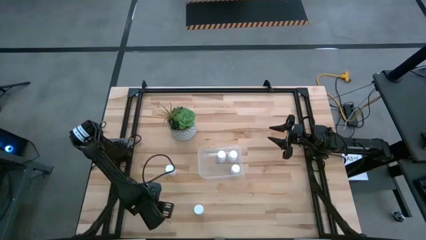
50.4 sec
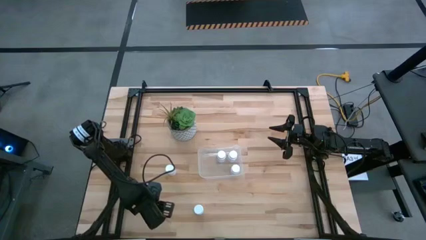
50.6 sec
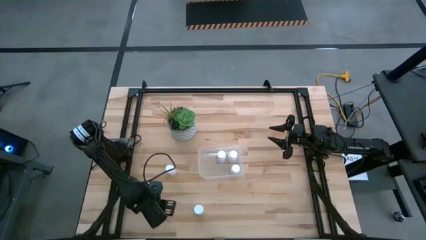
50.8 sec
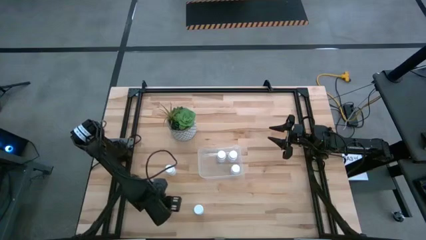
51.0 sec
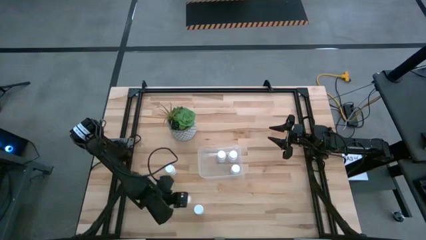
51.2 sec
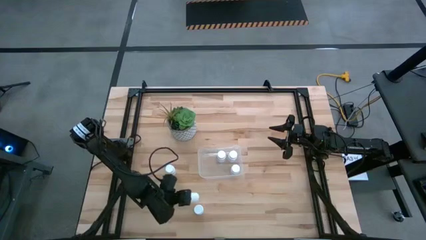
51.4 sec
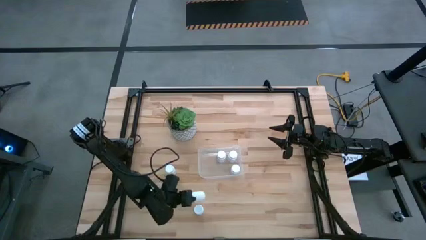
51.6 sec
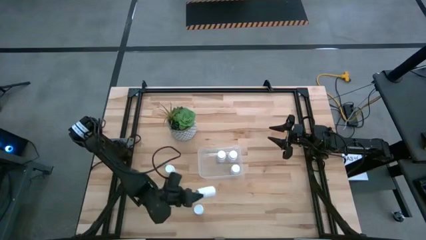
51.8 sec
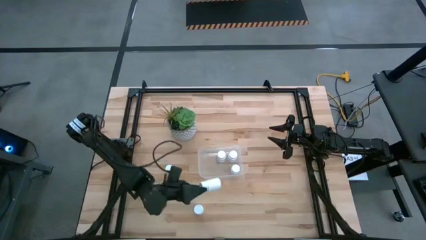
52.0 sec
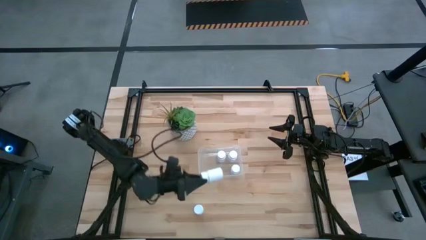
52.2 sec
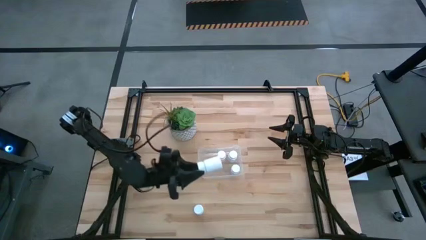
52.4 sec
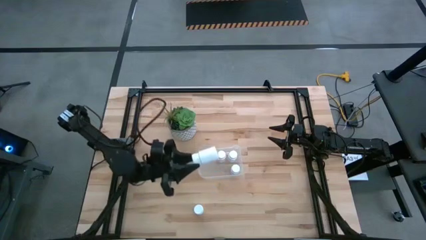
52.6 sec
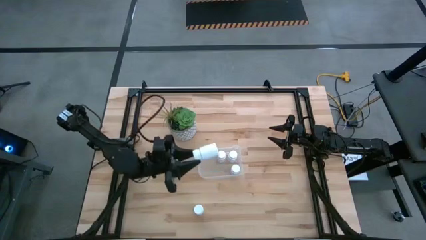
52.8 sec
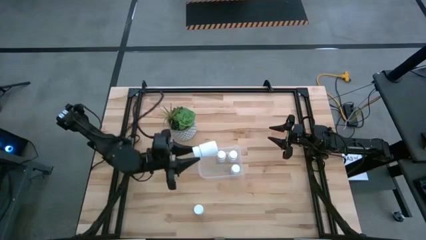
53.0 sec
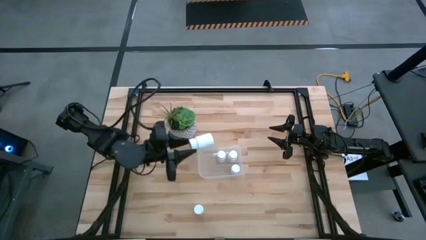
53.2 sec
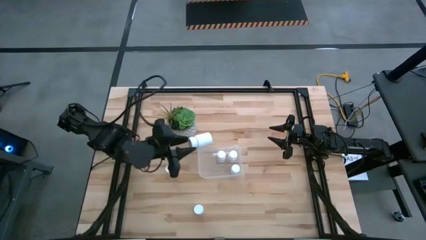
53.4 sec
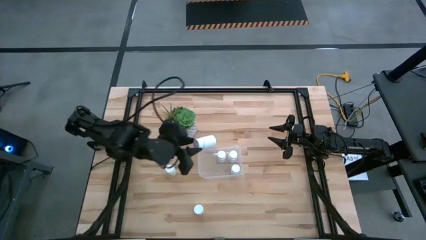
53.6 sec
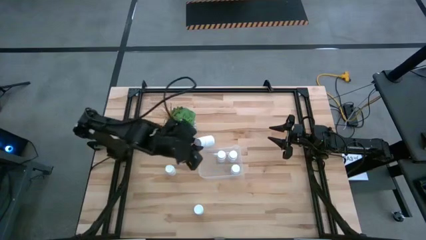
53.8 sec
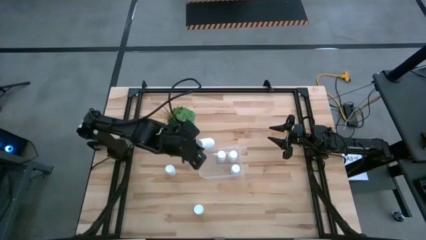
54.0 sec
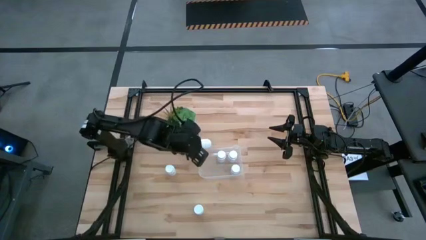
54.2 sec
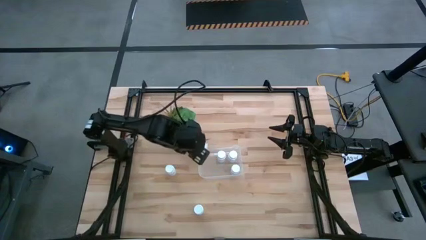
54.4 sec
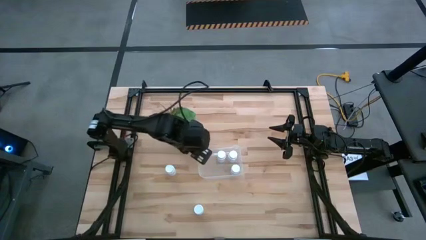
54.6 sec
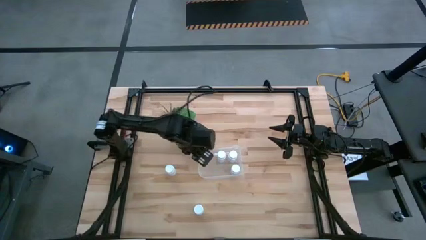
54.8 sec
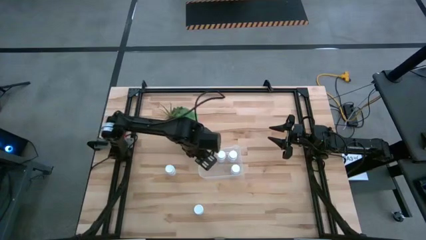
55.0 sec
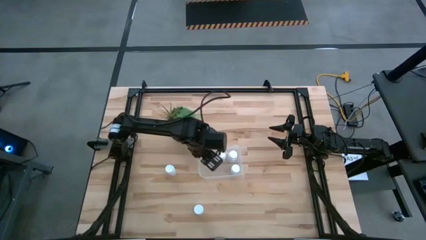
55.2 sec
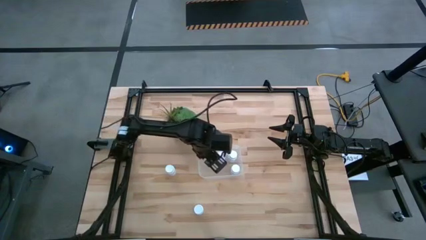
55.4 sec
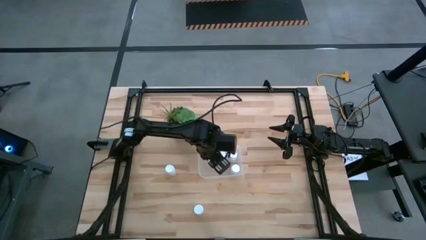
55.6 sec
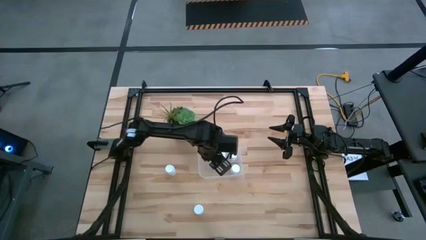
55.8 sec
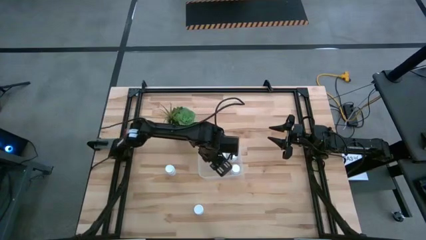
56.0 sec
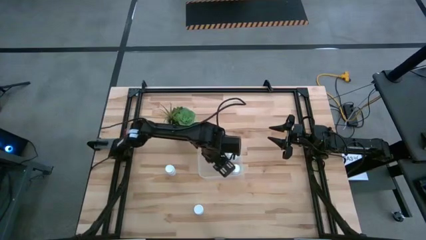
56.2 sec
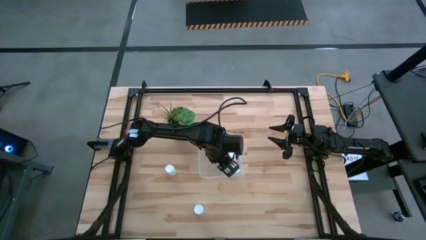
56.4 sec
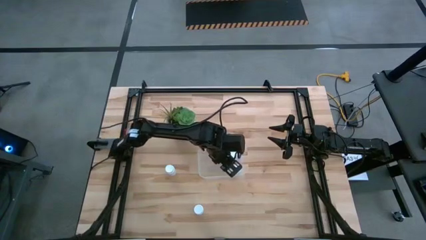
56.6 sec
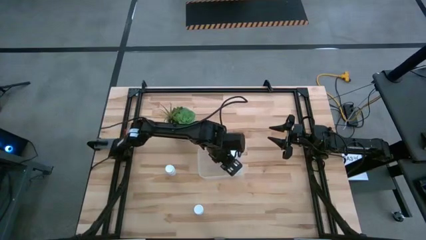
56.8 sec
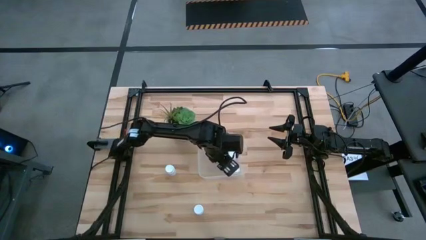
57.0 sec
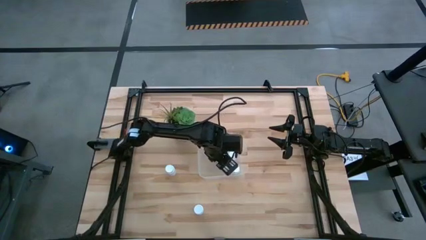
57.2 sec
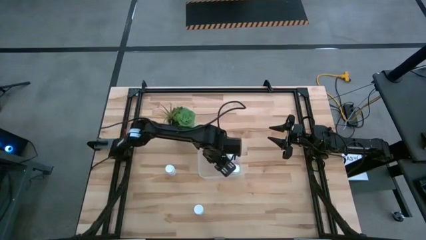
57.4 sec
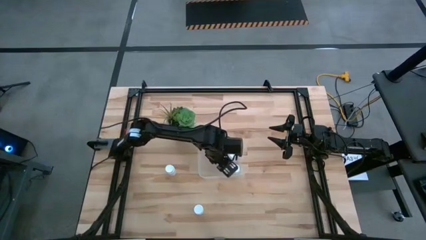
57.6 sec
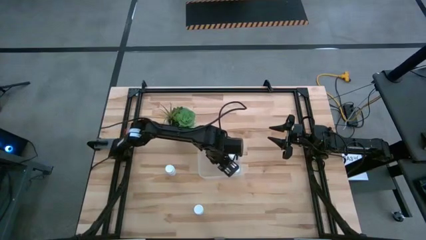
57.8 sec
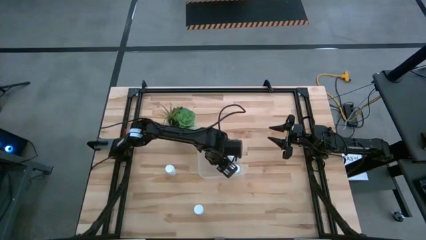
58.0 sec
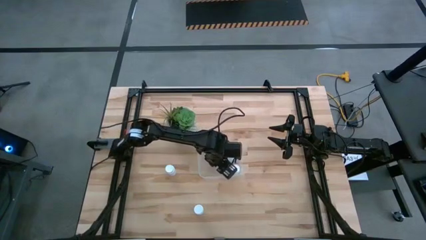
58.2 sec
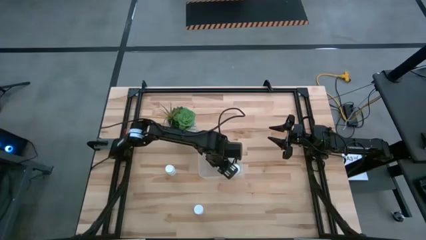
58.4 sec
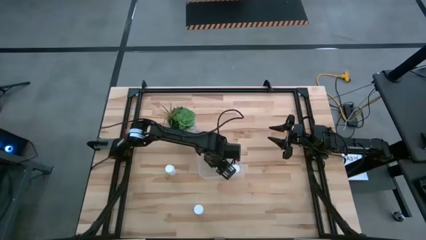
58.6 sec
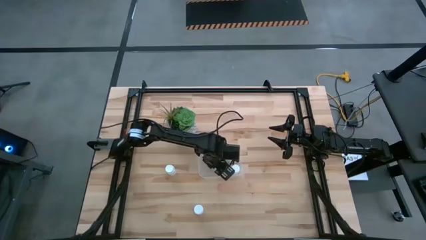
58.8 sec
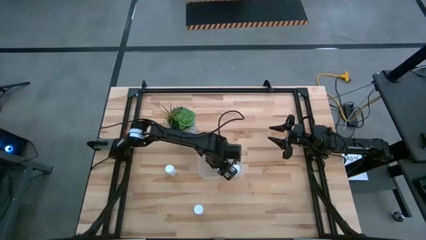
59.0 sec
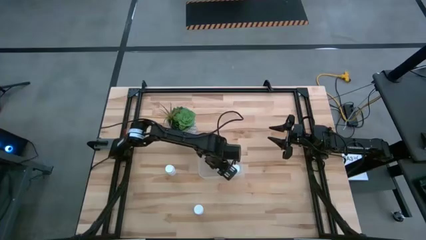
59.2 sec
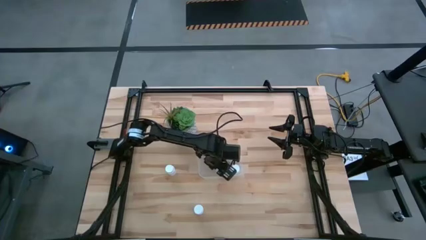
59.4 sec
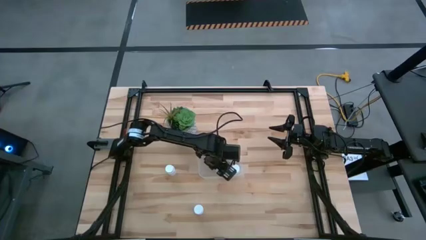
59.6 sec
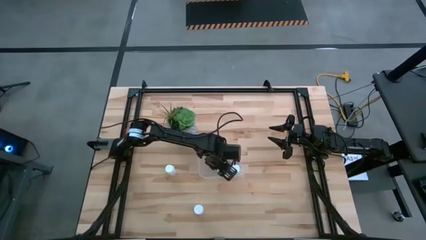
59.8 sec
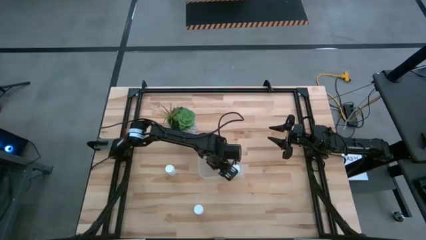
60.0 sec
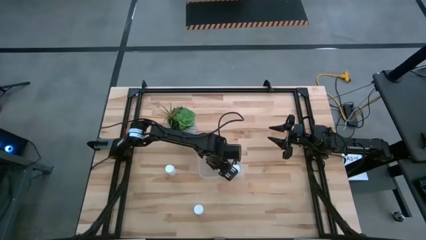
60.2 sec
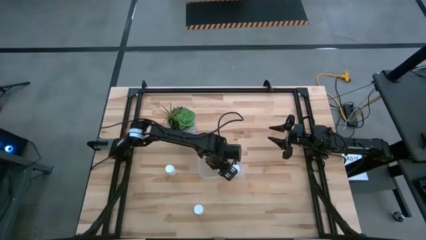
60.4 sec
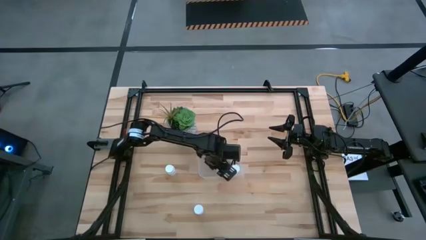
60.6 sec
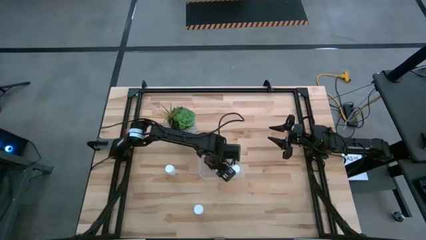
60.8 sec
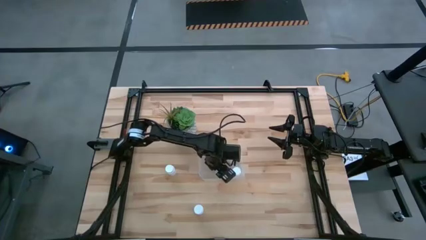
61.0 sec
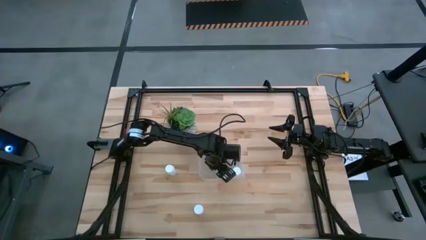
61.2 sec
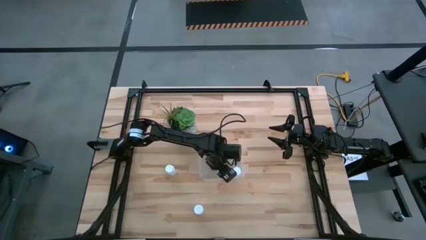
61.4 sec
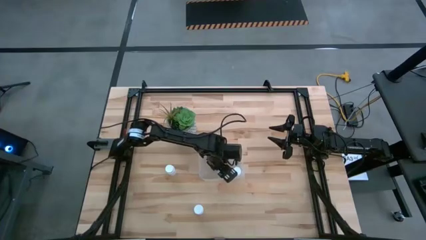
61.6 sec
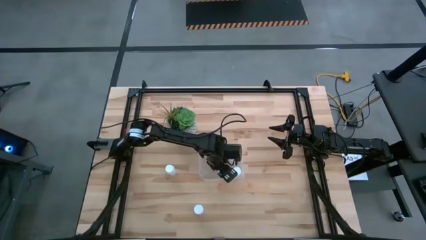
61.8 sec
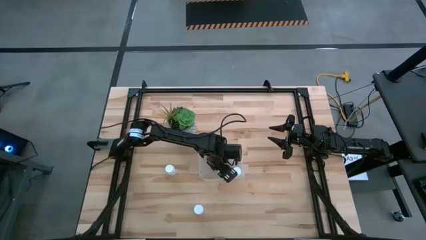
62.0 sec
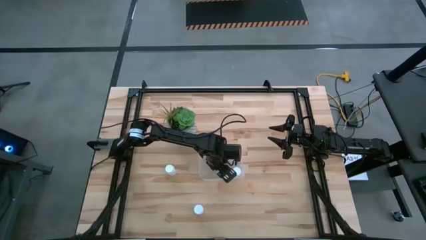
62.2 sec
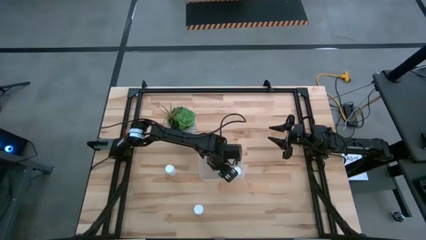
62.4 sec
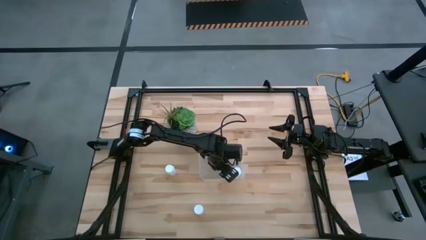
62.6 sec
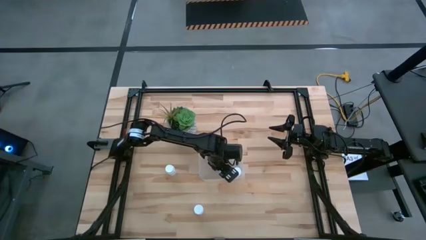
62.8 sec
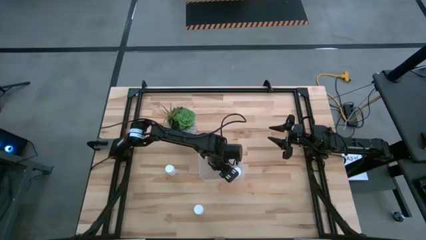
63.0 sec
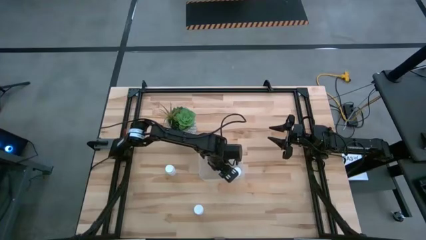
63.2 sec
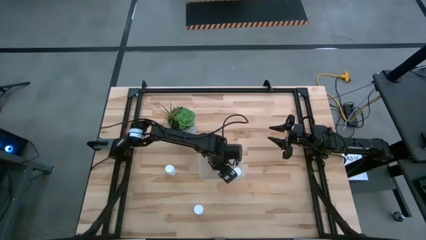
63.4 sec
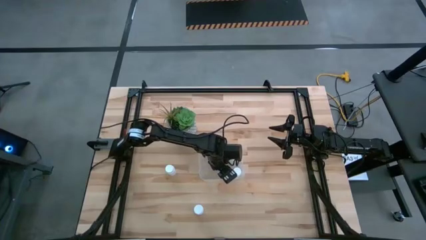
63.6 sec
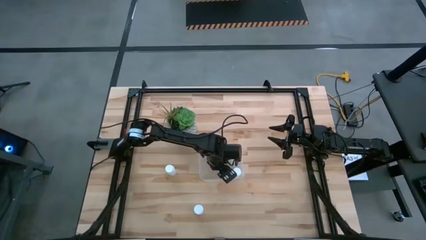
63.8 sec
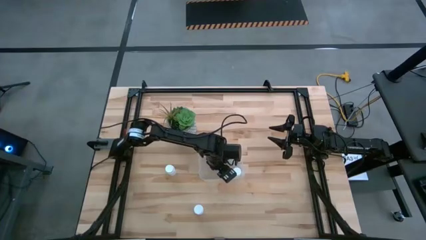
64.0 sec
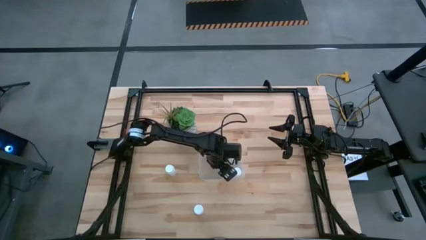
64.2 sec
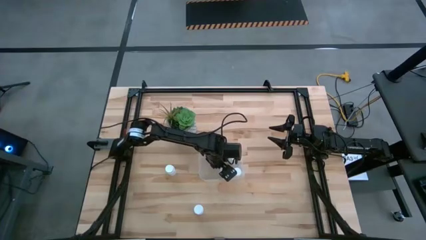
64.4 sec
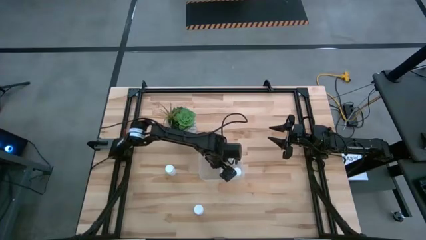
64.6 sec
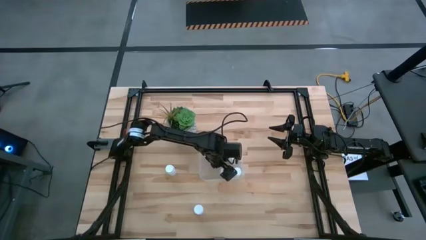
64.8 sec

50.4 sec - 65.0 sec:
Task: Pick and place pill bottles into a basket
Put the white pill bottle into the transparent bin
